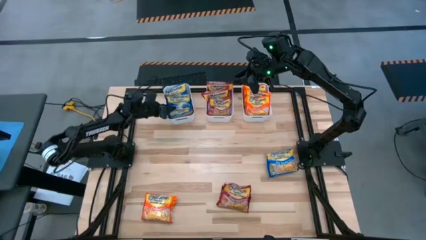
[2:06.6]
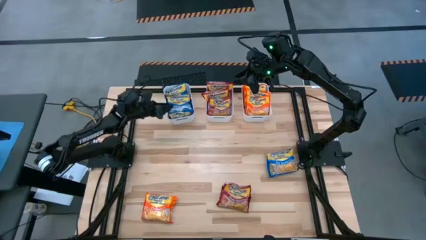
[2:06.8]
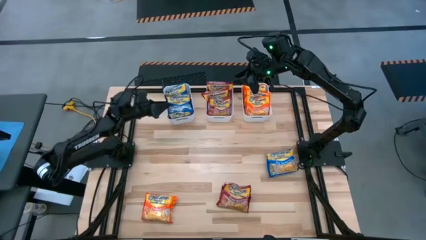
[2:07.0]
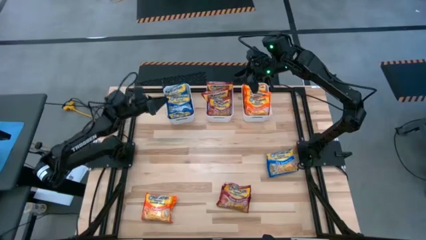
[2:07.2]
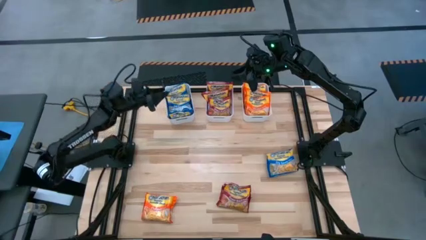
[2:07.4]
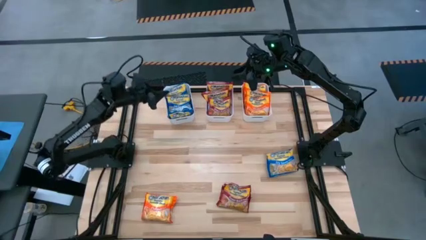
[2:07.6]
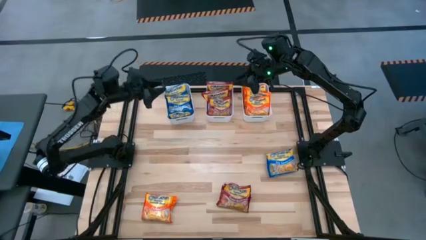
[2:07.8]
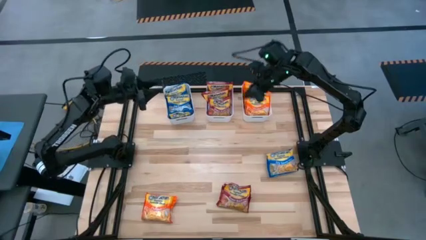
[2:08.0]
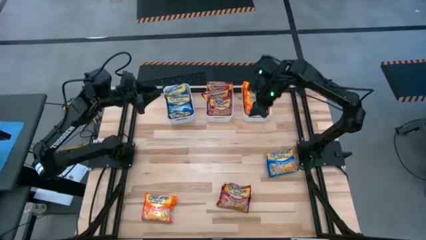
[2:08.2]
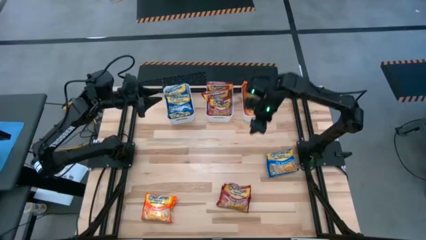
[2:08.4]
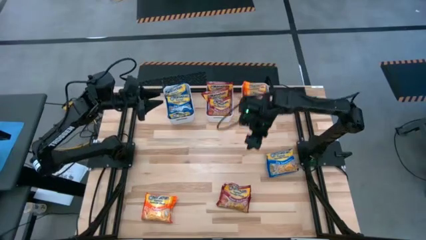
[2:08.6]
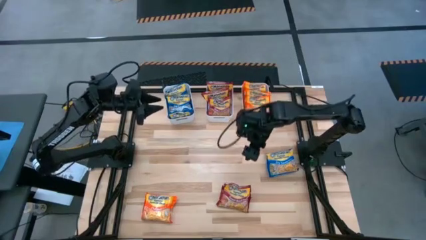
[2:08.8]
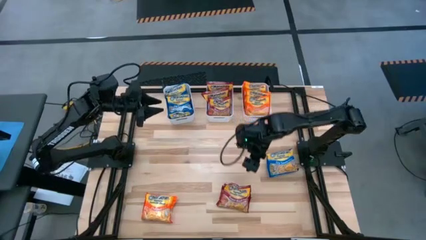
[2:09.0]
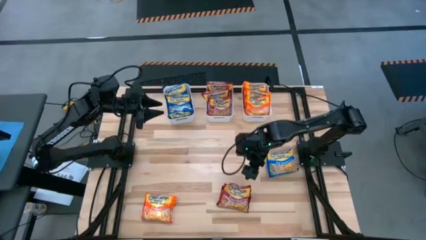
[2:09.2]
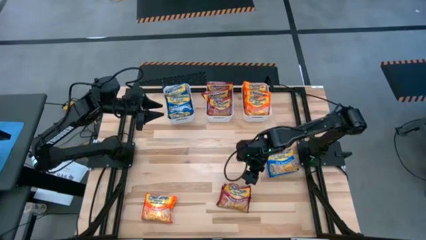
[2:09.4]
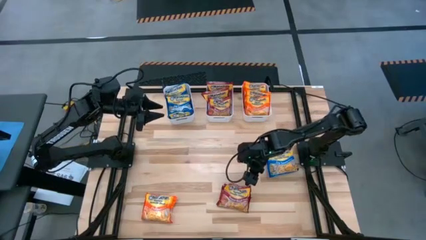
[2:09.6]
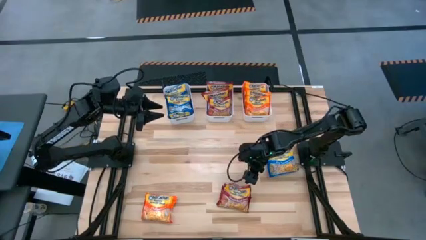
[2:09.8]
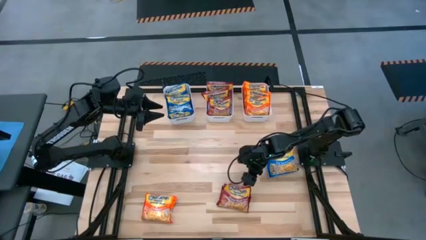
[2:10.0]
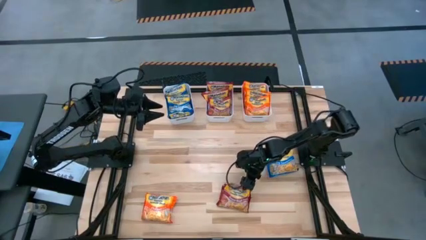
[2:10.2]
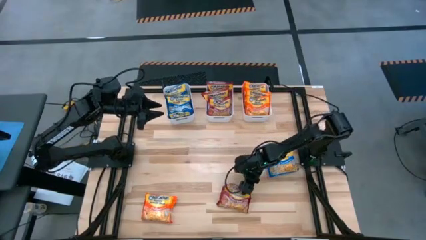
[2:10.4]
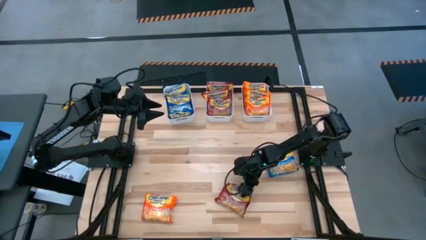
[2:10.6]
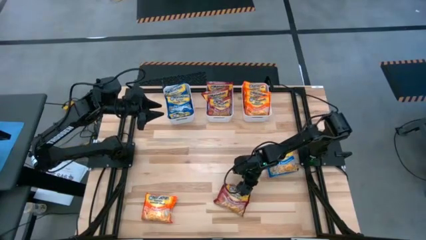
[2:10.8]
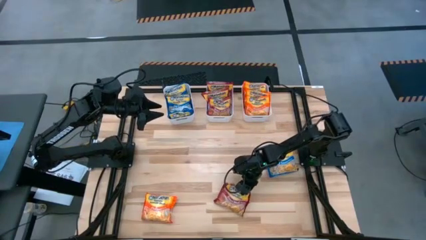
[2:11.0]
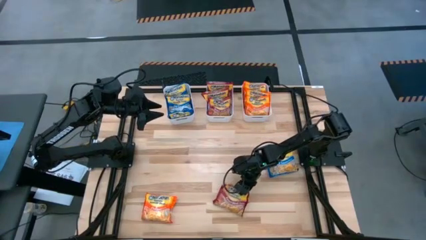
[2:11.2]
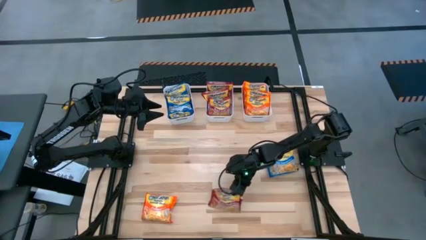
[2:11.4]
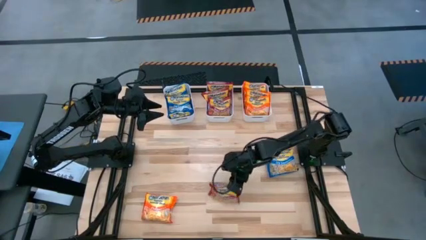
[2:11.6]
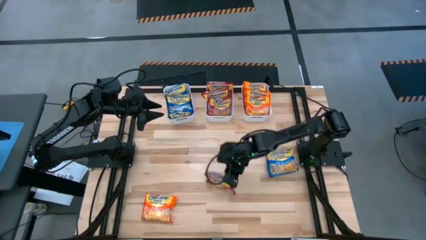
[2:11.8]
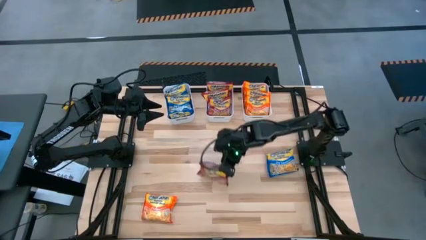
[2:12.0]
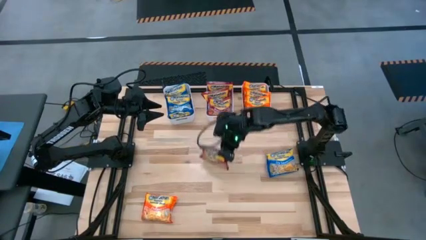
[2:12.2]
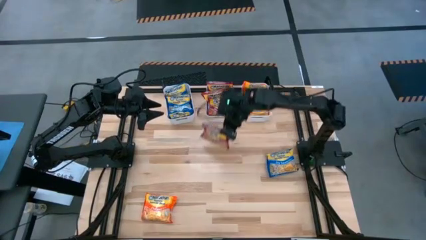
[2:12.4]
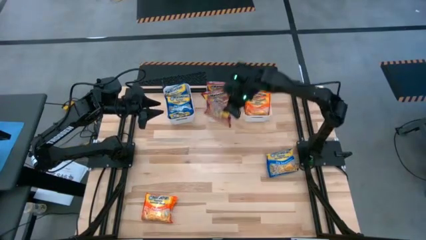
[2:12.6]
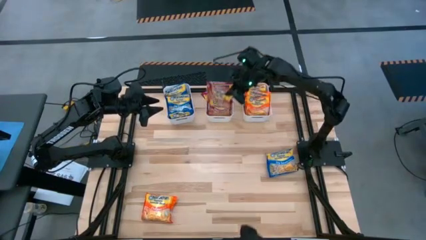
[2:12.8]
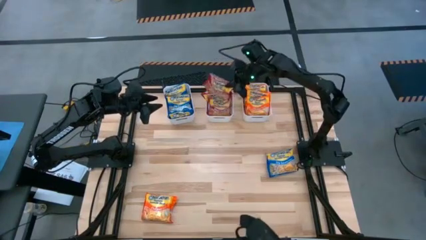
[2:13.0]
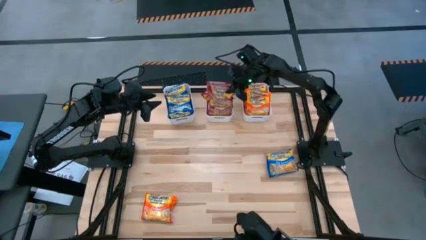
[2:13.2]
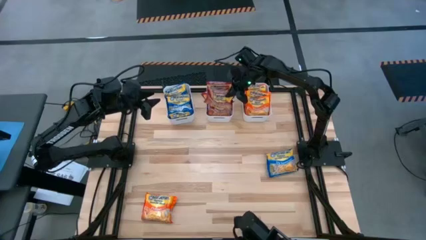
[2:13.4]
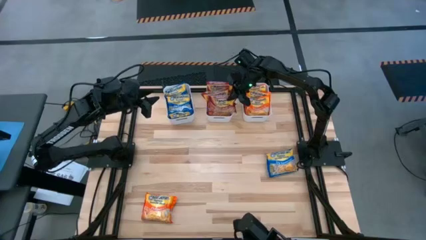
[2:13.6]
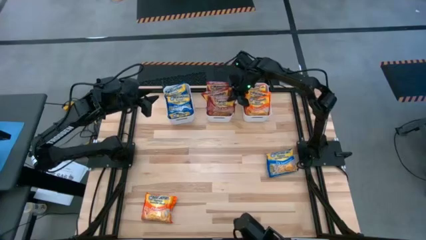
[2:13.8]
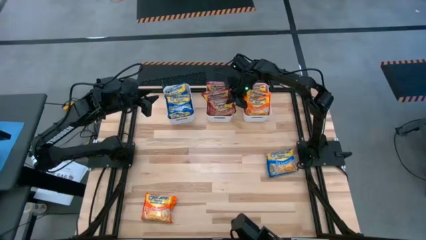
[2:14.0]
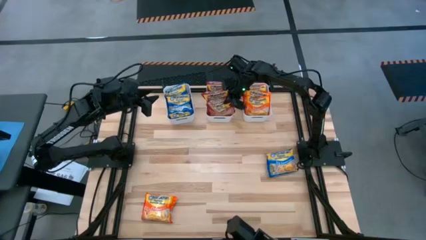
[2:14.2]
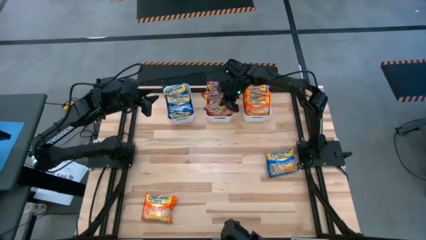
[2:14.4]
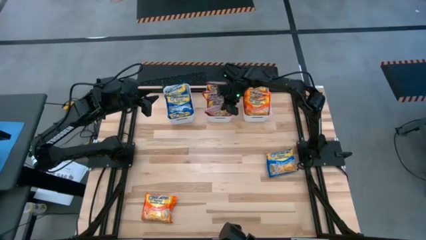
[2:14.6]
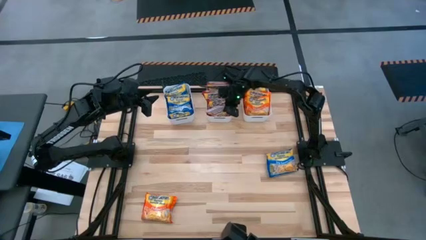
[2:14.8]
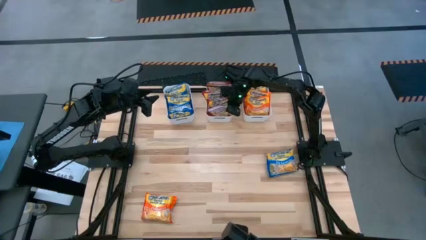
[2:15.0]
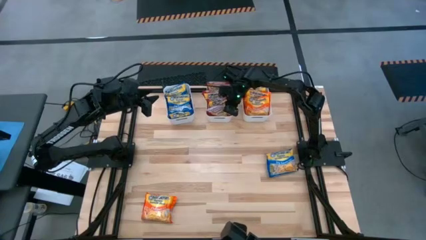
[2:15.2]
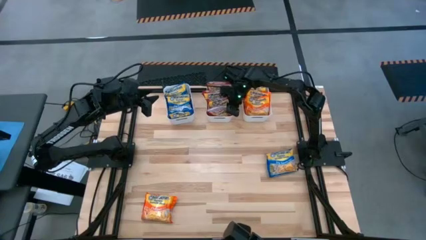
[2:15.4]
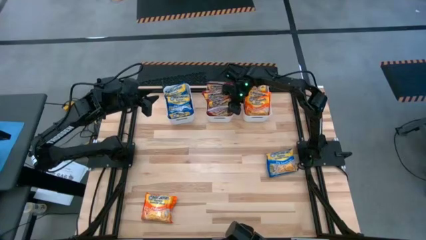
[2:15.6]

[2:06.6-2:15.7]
Task: Sort Maruchan noodles
Put the red noodle pack into the middle white bin

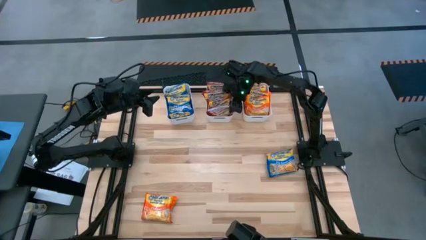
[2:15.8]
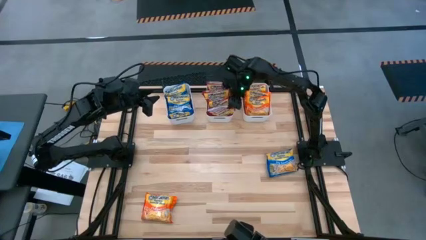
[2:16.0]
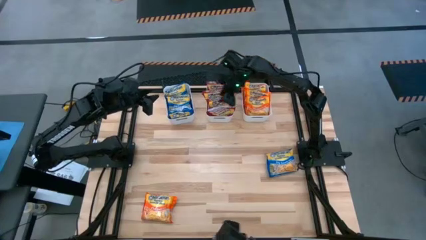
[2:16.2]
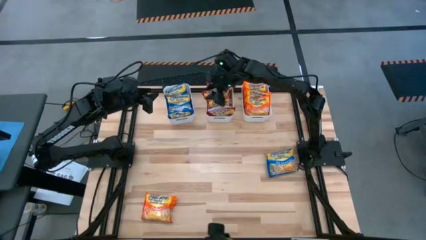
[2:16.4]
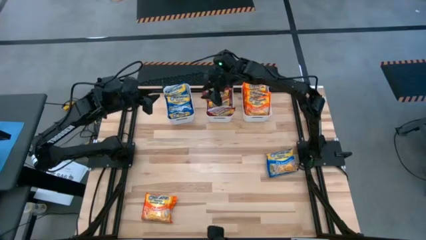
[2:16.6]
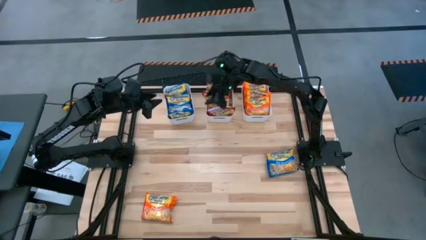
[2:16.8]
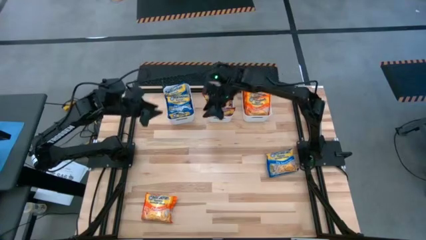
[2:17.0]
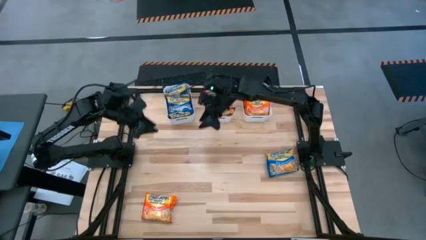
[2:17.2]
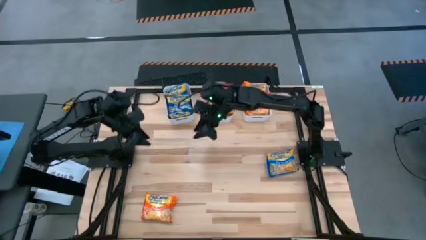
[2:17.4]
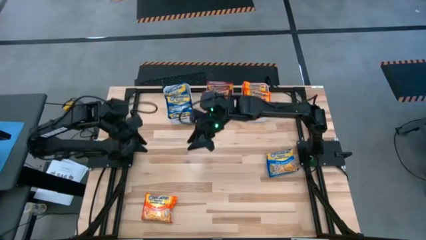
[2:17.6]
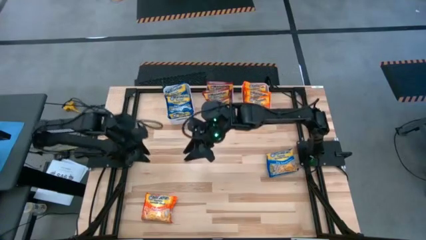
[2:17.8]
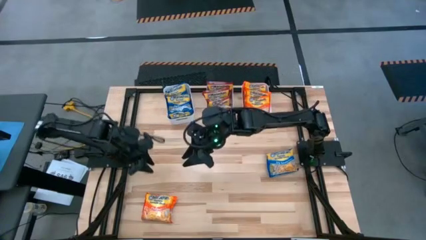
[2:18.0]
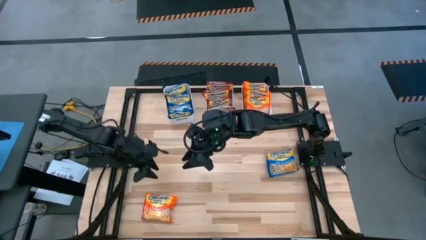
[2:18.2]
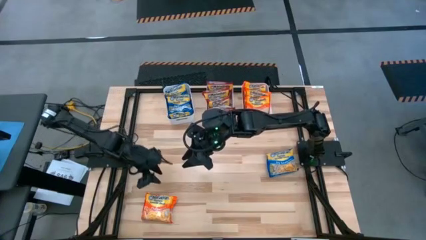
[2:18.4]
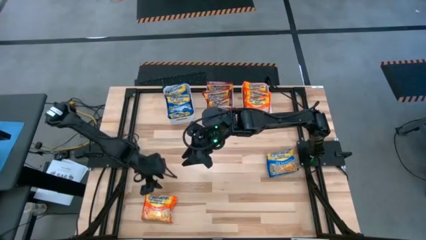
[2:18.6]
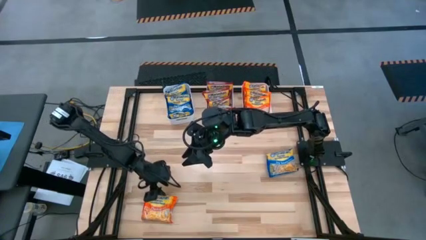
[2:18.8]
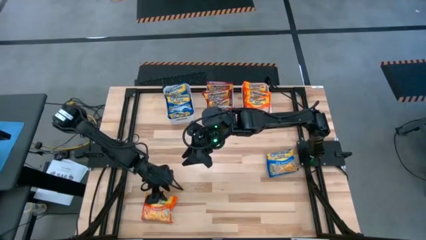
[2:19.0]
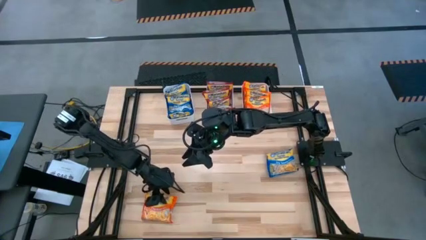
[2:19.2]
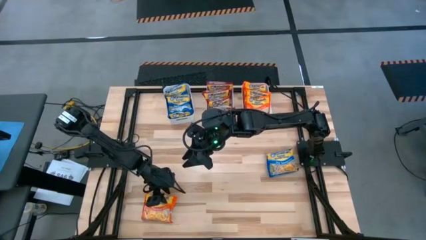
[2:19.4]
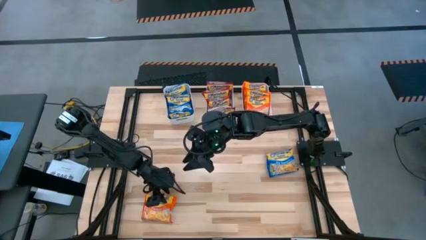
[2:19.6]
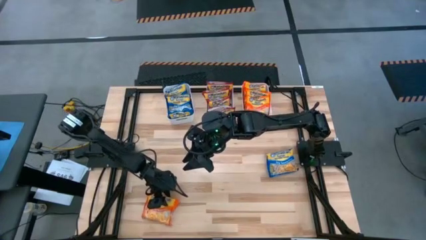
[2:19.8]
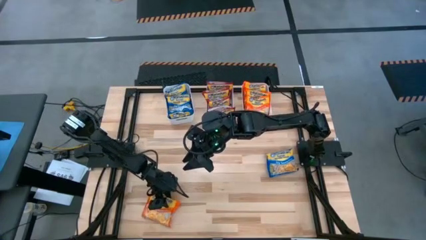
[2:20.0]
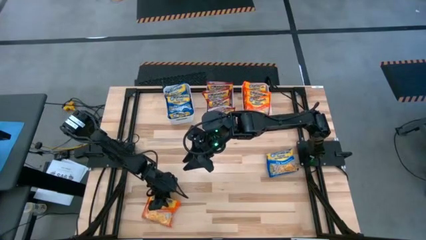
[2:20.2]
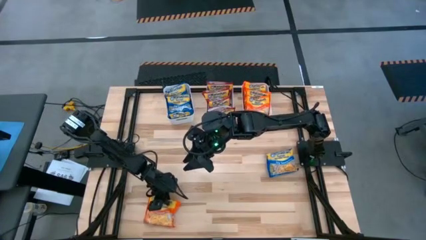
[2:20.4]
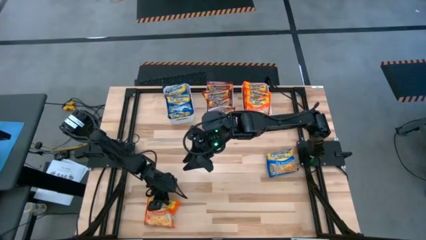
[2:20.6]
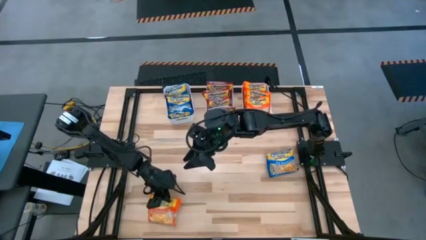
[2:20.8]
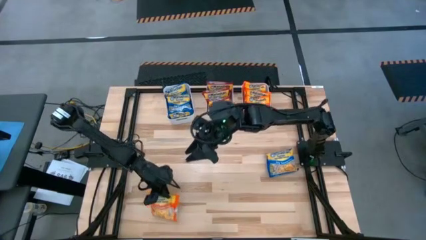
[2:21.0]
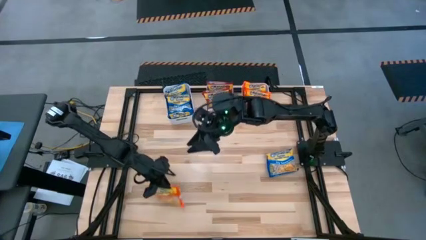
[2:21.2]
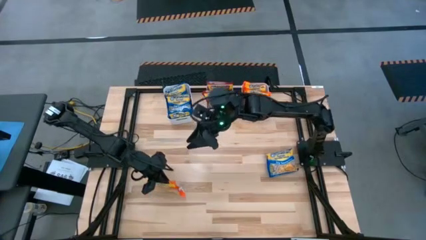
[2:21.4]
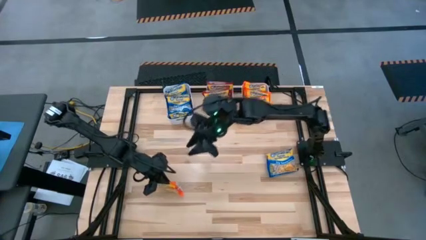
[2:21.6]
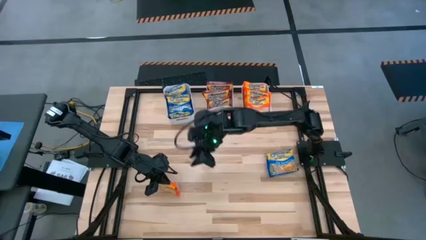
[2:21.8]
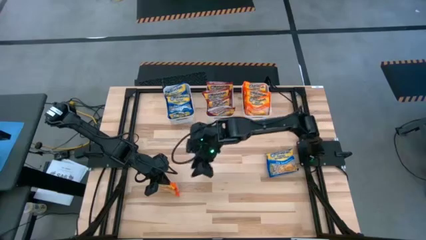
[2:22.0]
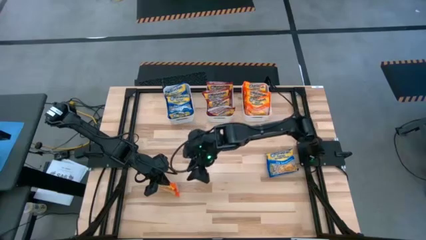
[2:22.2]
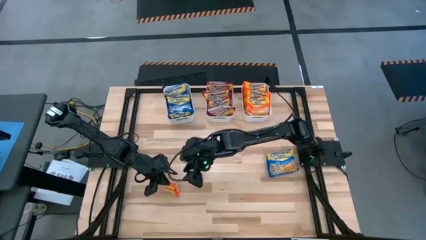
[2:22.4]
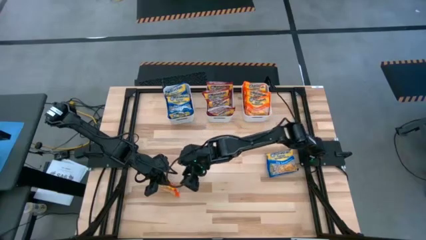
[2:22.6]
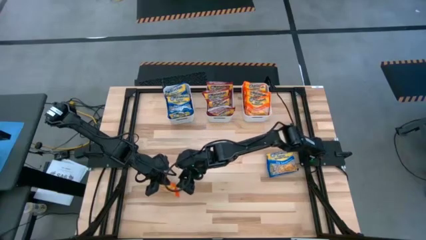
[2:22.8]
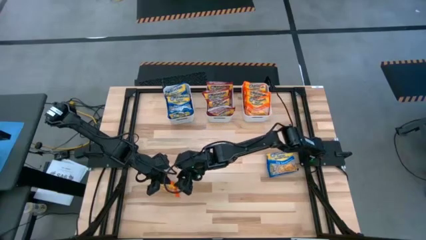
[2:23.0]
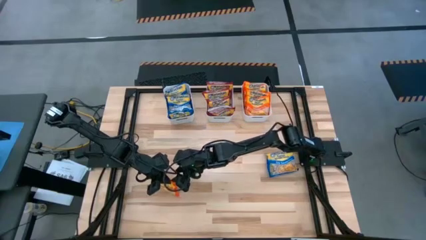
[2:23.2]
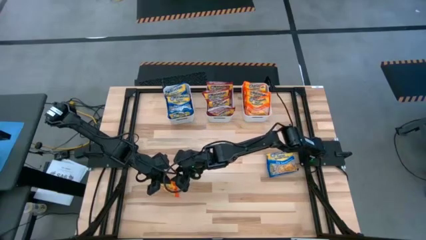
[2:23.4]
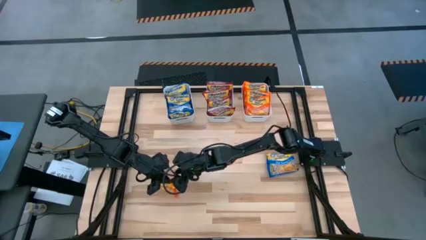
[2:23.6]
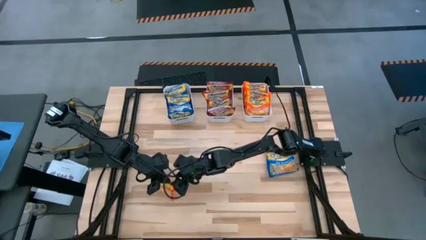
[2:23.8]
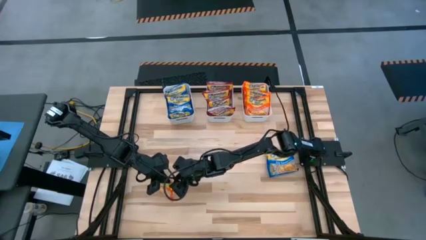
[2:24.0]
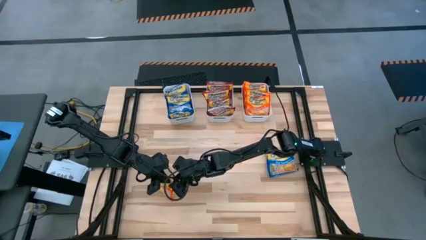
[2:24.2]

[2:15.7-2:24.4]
Put the orange noodle pack into the right white bin
